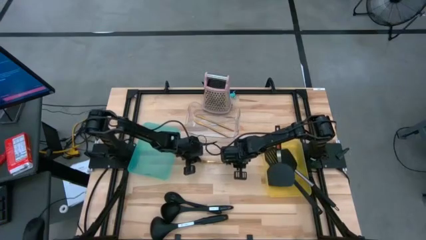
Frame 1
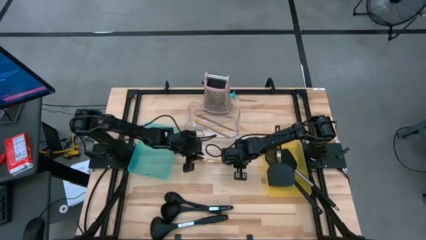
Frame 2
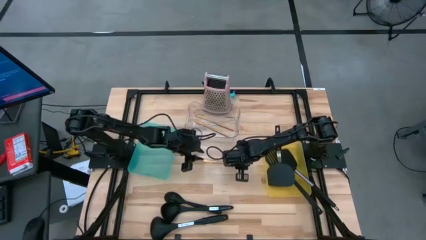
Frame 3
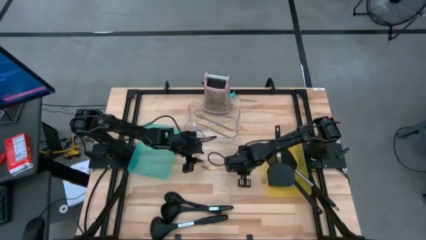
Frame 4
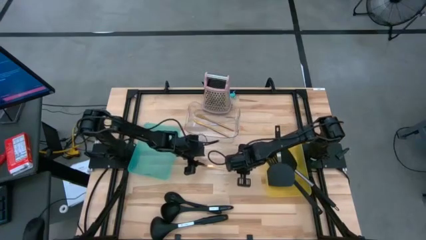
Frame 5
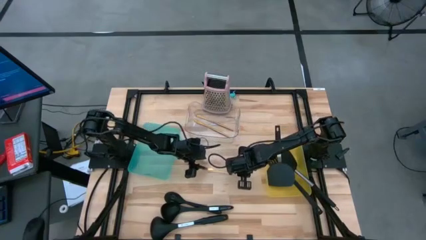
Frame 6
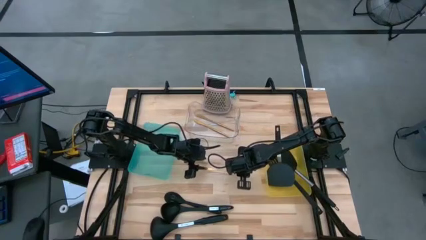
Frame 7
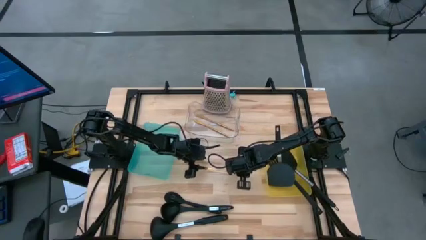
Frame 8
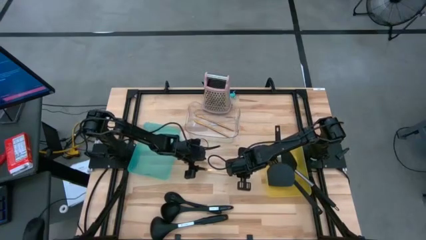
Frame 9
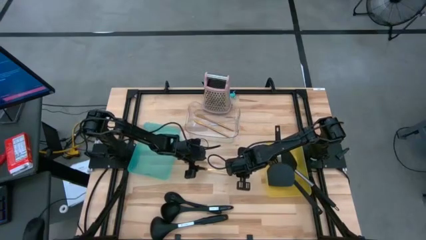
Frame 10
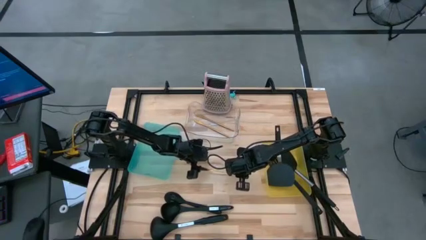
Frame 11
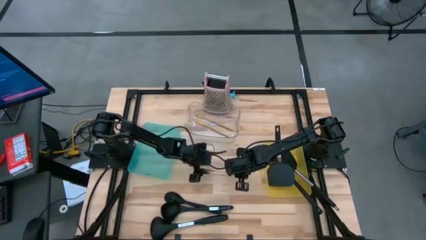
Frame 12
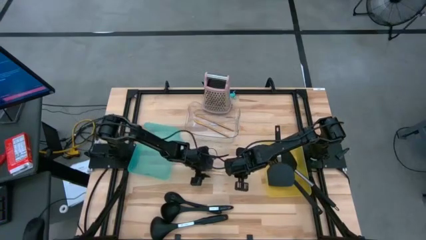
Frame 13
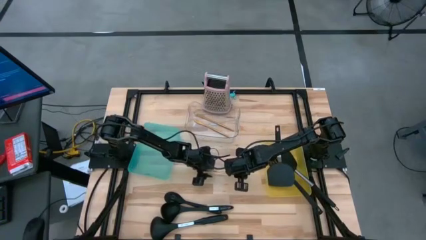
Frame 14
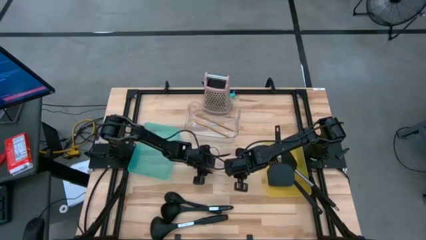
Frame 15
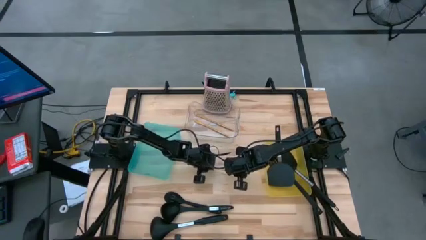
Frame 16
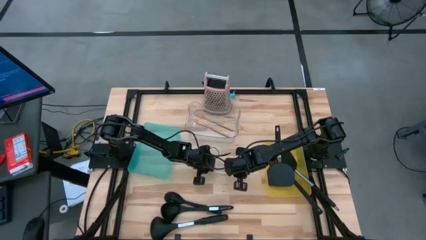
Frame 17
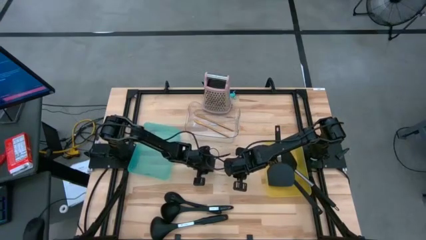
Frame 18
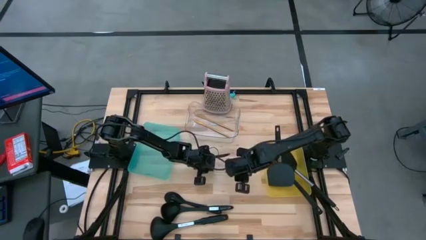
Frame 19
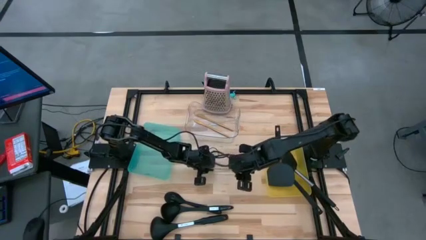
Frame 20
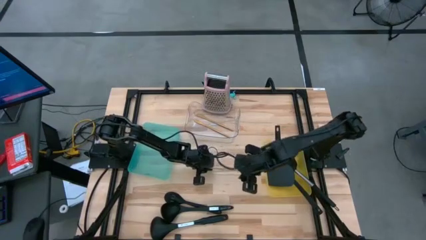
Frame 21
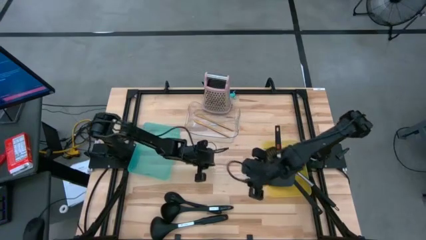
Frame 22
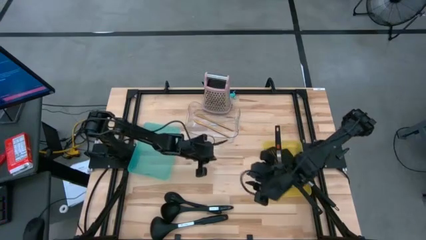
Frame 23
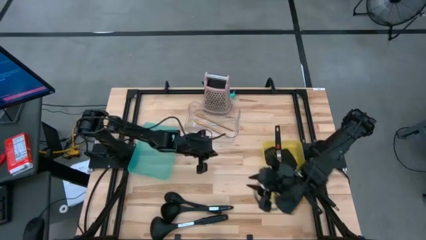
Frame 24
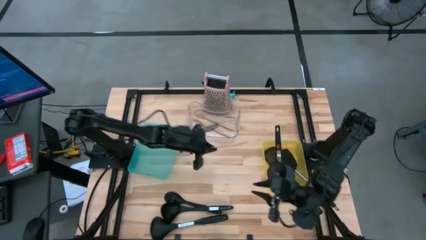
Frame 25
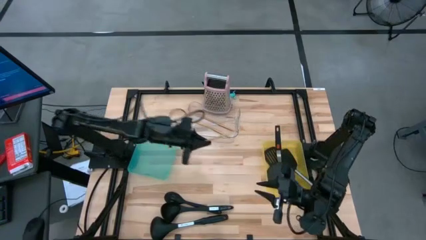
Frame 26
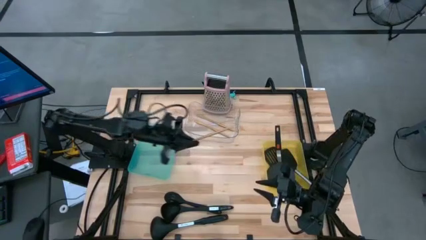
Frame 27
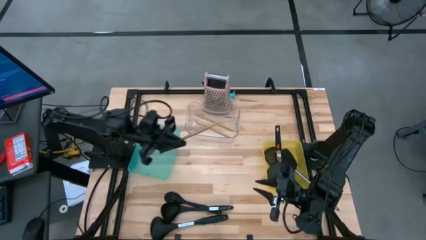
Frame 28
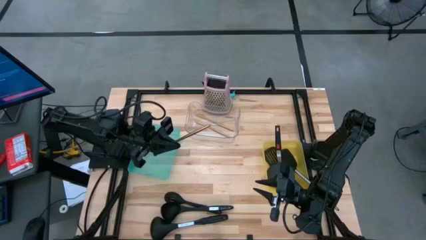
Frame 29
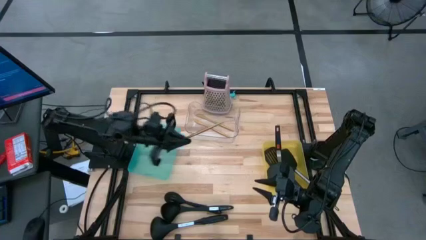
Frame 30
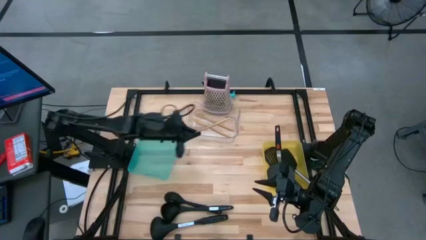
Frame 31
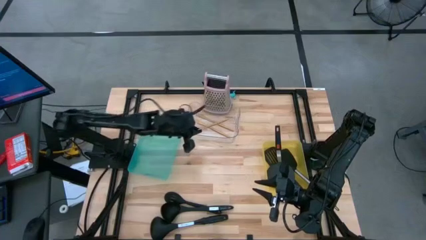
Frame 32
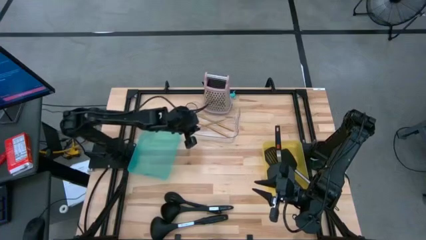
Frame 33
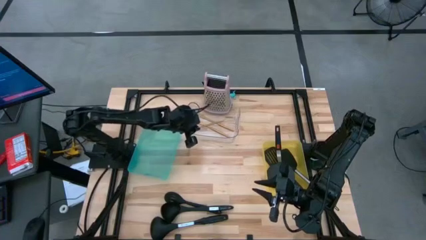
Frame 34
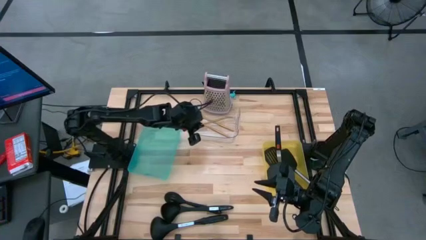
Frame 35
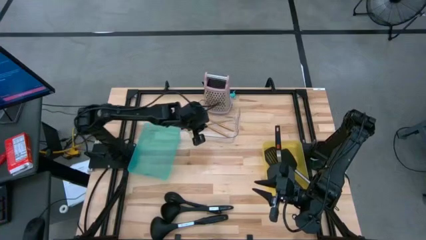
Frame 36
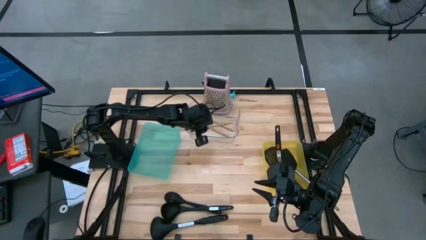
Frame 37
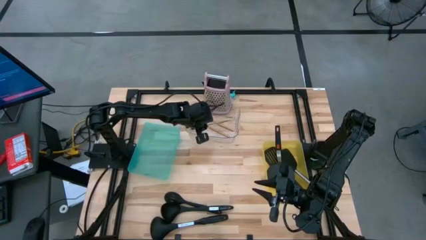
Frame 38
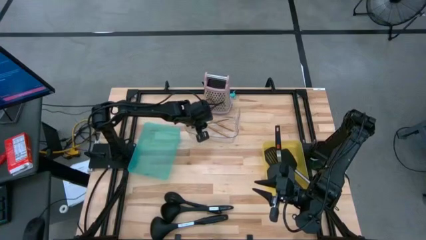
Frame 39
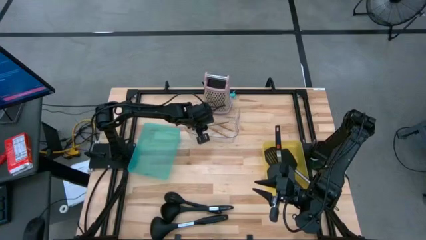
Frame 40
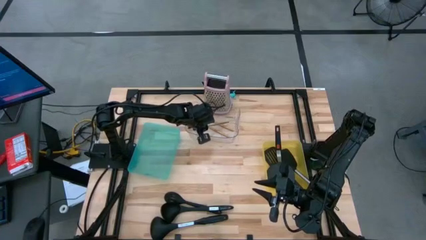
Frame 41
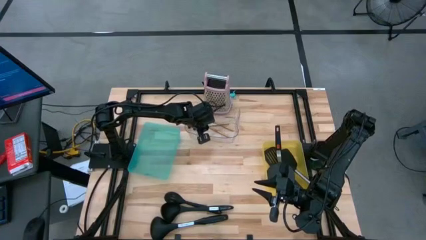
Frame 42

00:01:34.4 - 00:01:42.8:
Task: Pick & Place Kitchen Items
Put the gold knife into the transparent bin

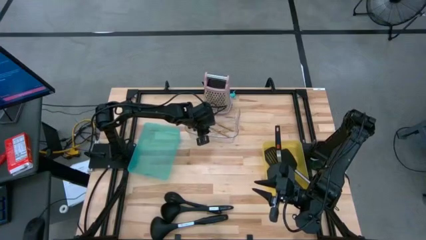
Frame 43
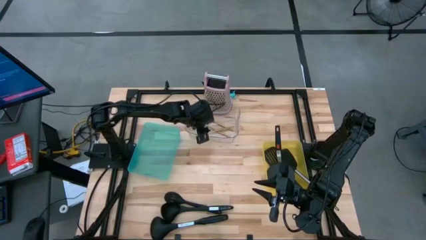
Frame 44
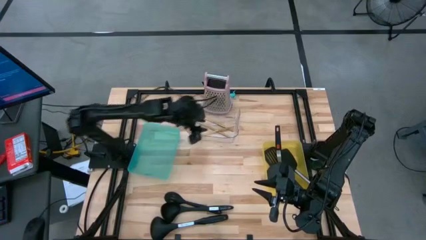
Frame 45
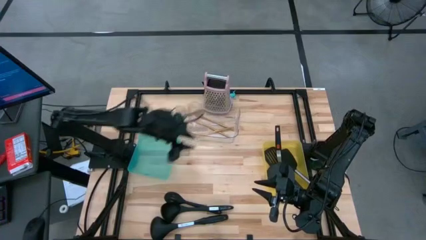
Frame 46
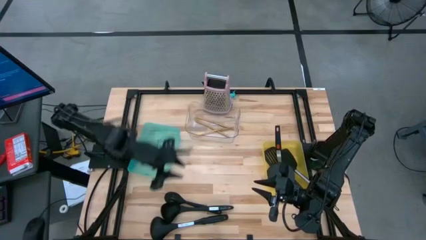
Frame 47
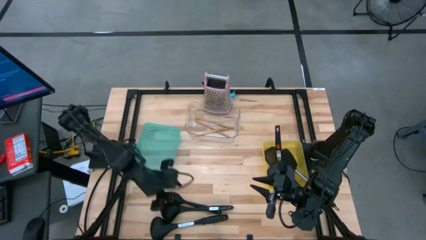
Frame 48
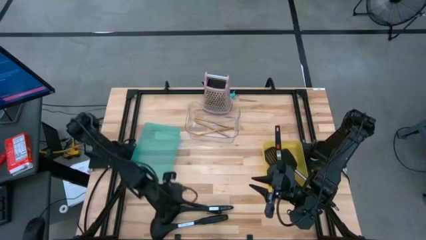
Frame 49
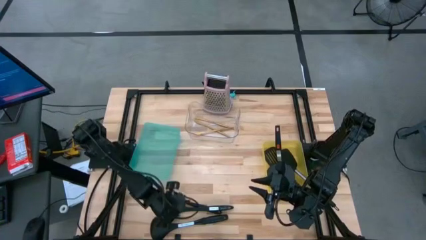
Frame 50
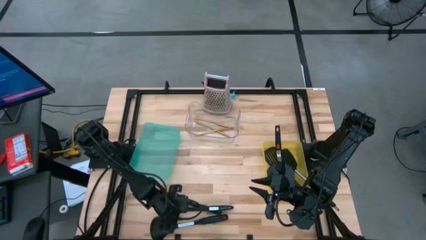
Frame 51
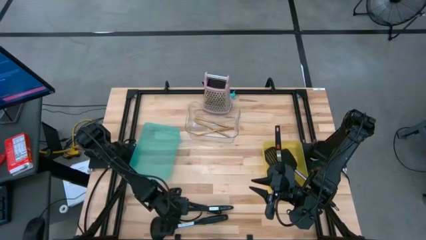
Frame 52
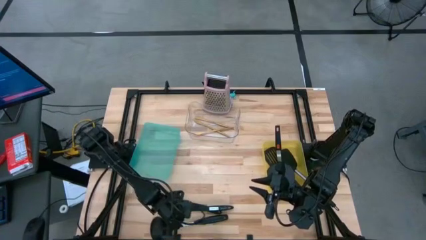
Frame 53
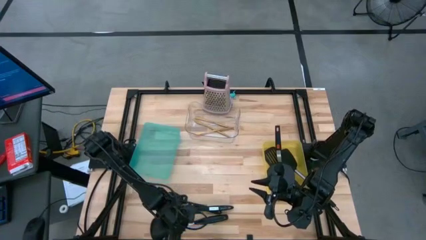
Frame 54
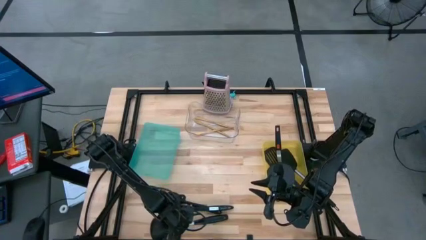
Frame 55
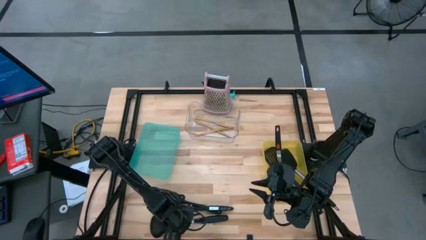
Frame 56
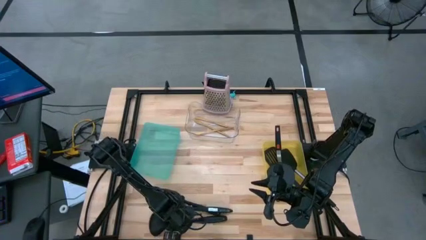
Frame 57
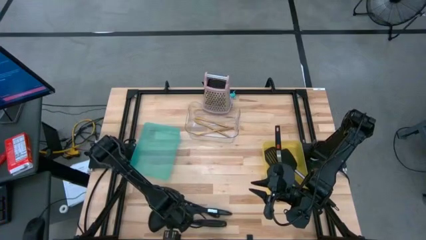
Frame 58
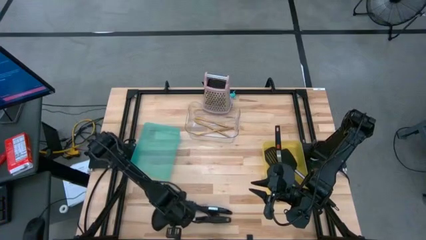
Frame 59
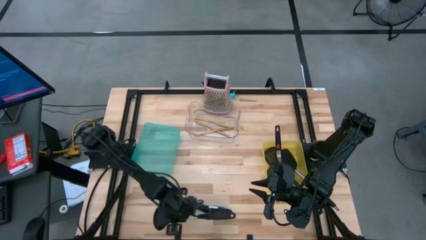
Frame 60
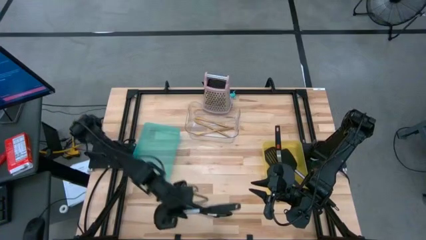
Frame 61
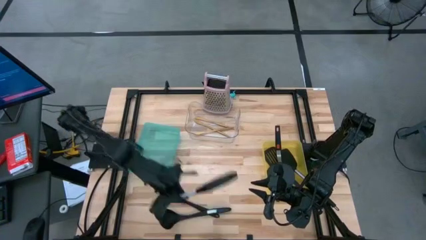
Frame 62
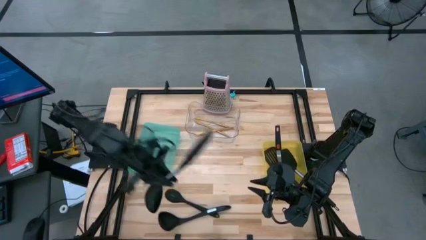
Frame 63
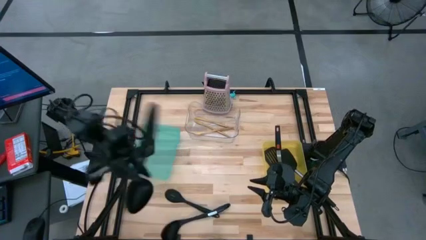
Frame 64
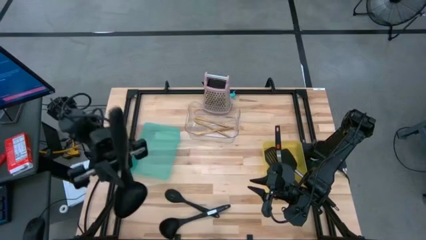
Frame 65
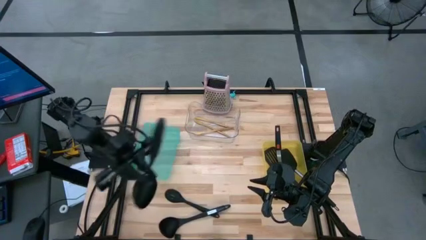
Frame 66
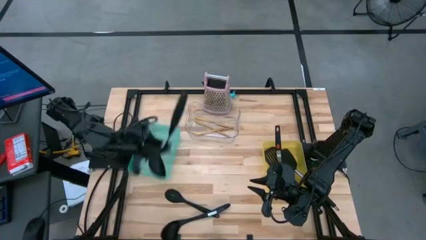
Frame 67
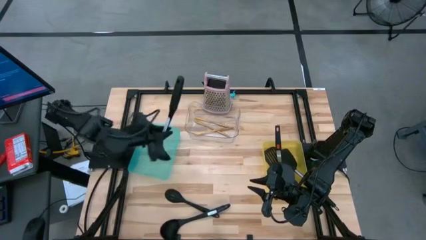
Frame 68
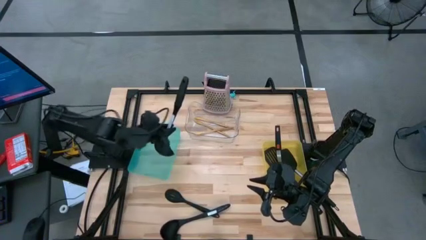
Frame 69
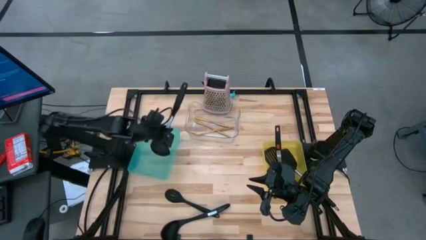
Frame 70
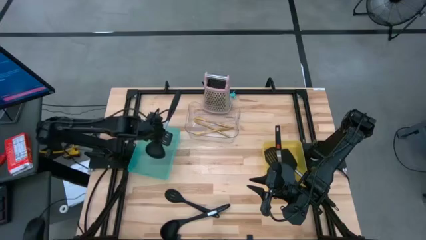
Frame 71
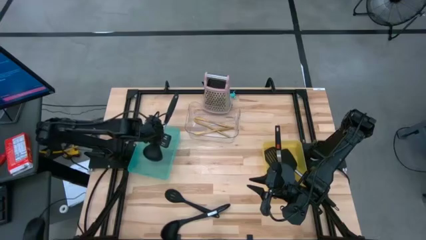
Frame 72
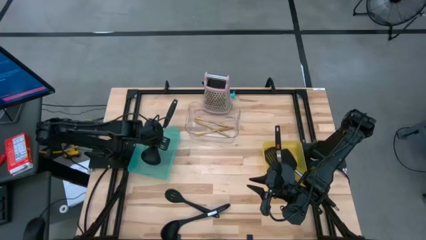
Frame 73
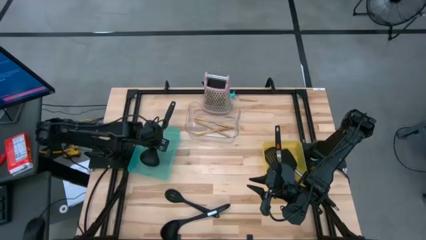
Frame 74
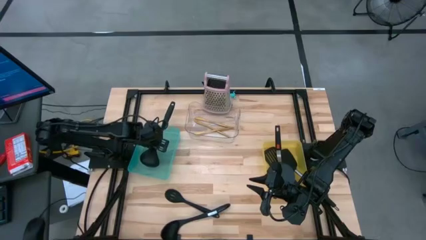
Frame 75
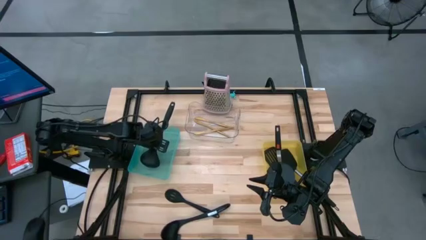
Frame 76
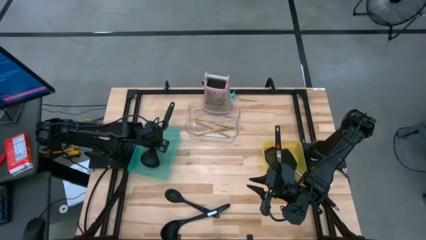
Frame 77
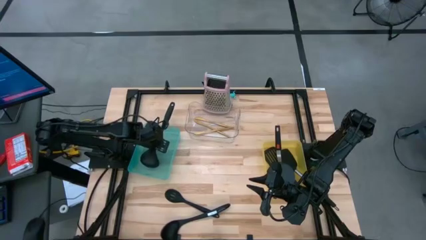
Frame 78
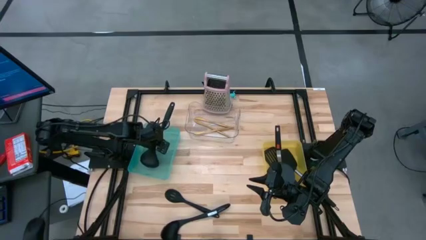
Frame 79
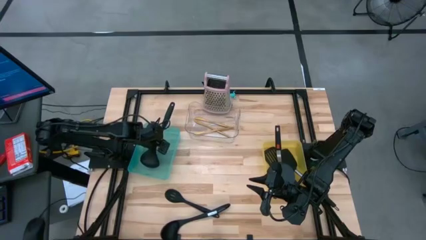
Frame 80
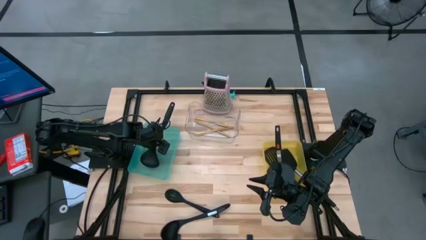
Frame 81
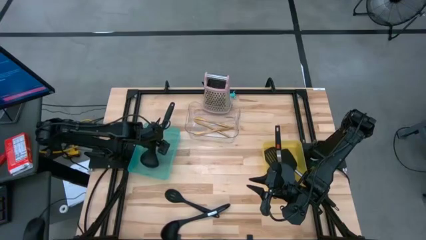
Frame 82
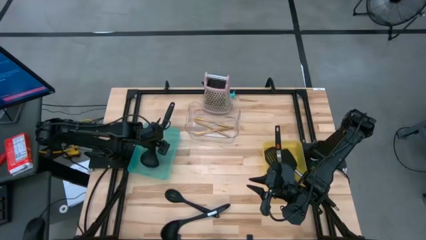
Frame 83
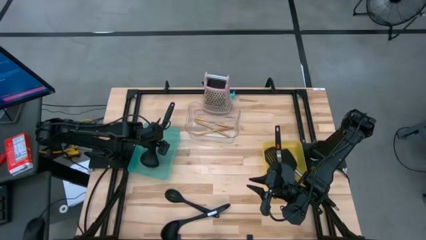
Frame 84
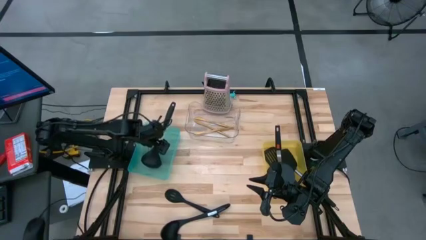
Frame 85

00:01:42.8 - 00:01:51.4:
Put the black spoon into the green bin
